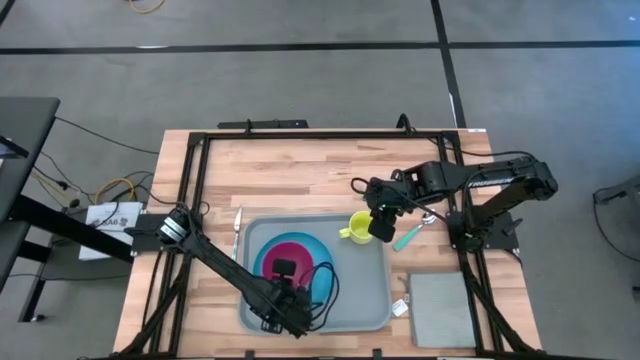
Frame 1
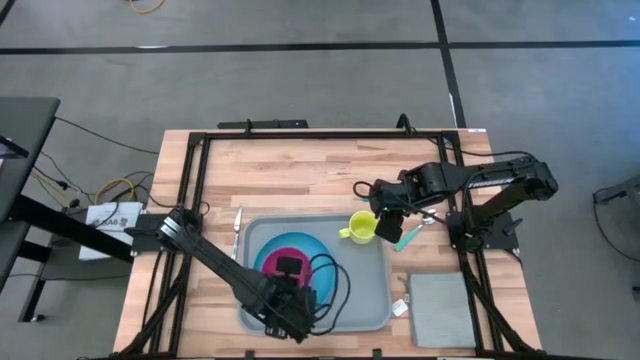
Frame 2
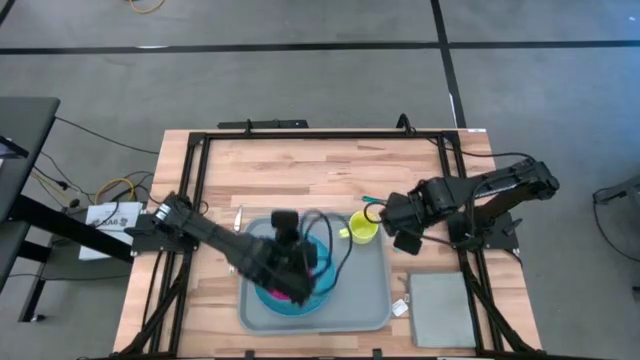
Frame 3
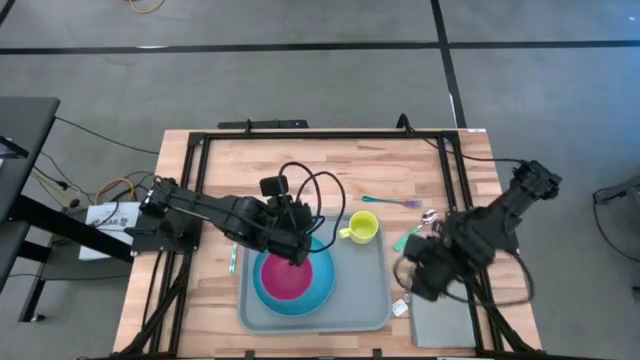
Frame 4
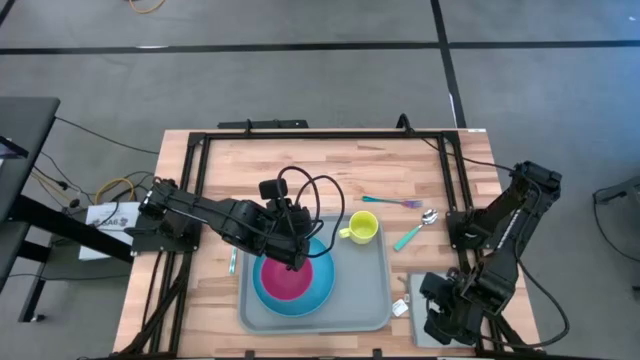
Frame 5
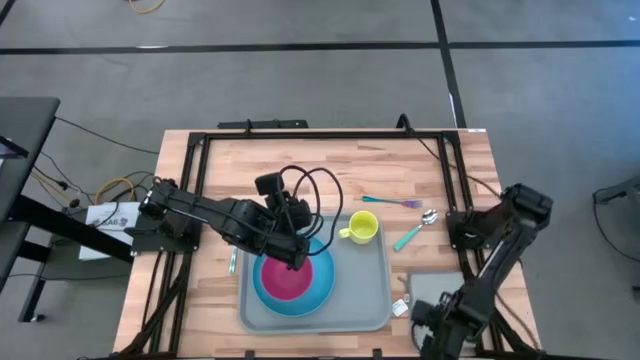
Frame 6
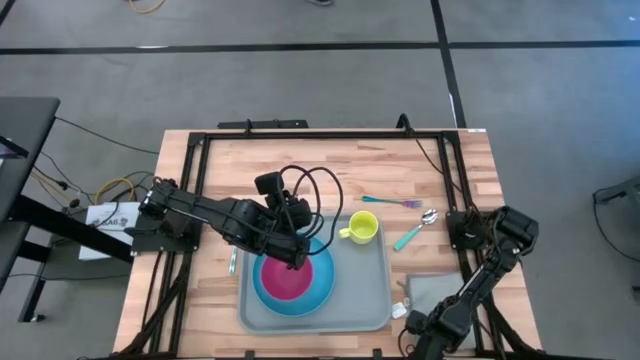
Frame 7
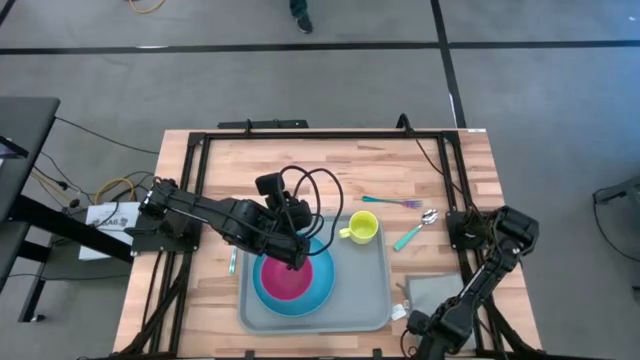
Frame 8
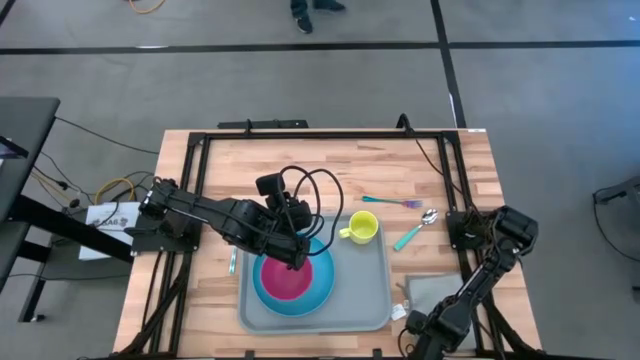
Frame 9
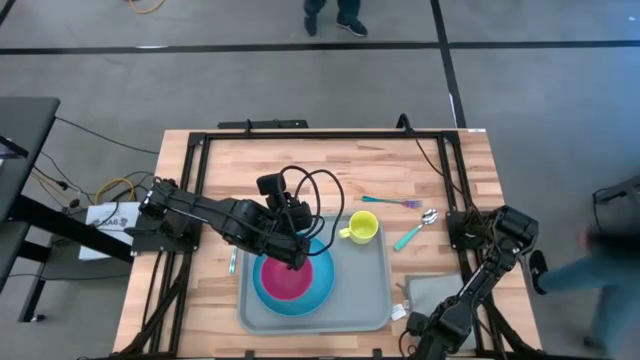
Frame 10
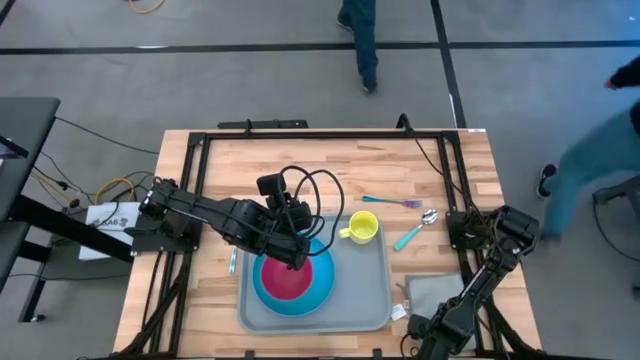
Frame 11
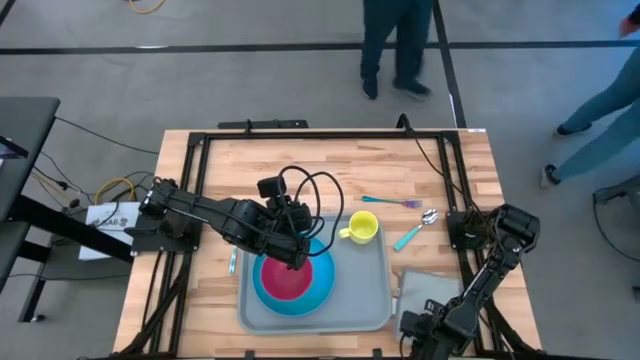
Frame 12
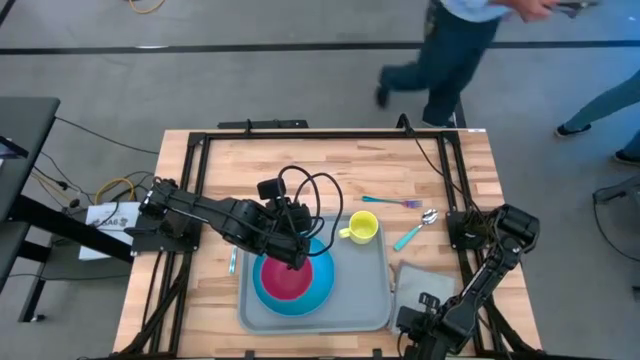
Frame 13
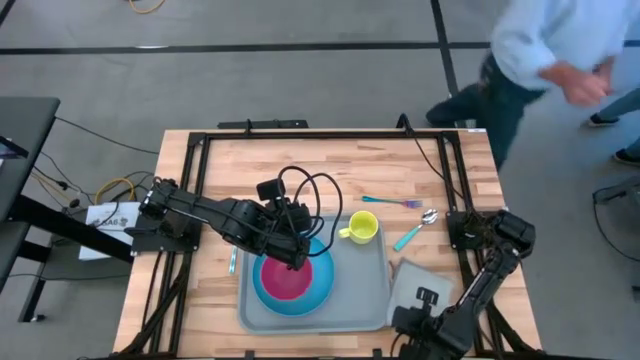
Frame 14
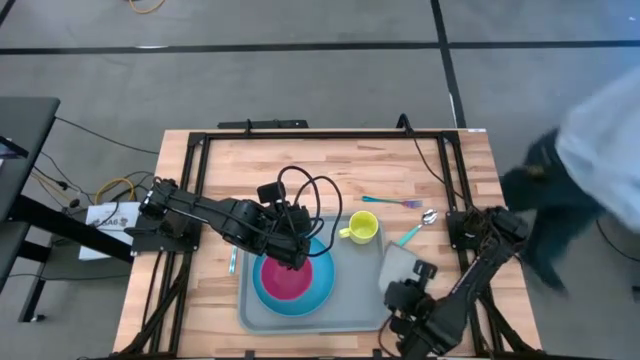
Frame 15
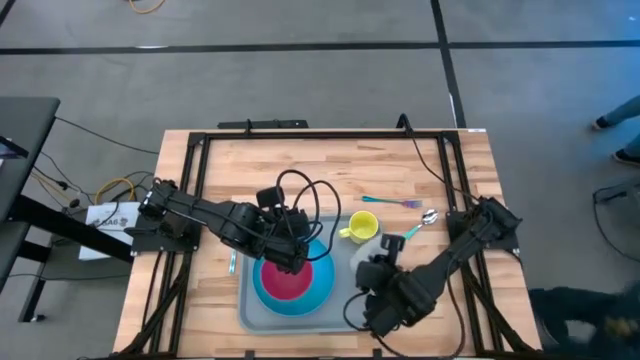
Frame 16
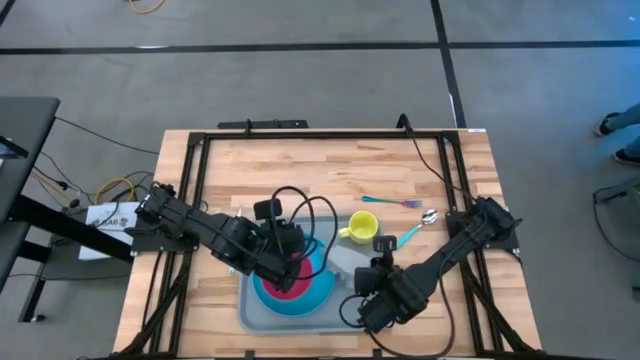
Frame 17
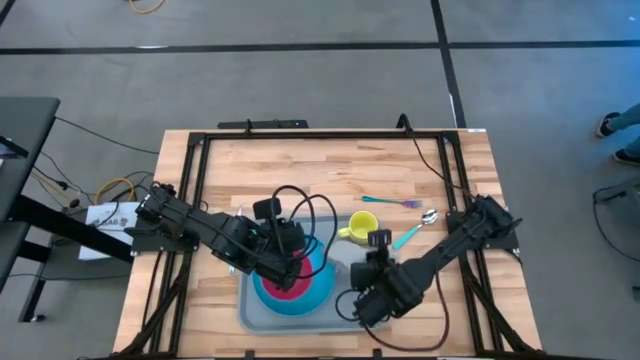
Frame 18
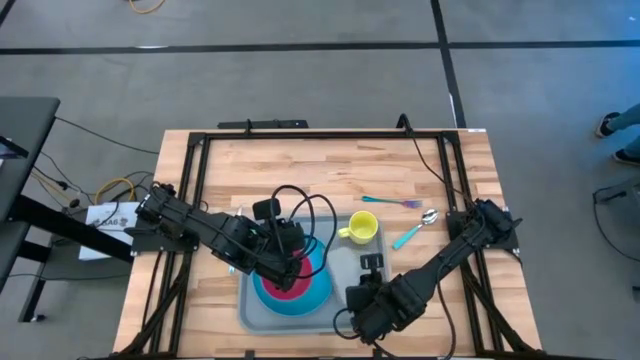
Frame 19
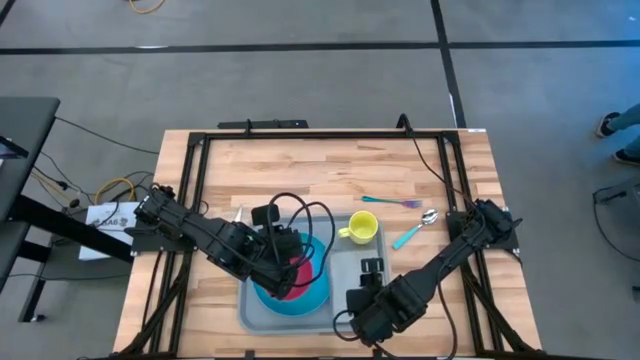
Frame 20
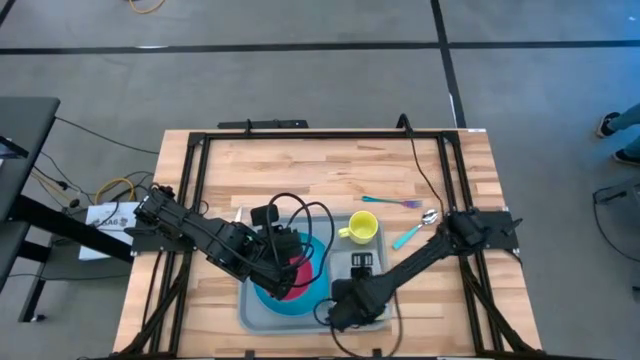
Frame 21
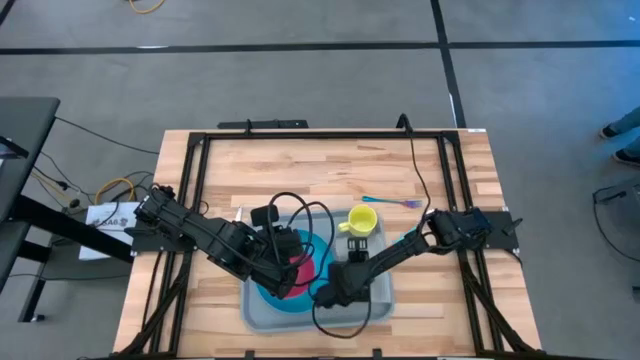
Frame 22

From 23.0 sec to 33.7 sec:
Task: Set up tray
Put the gray napkin on the gray tray to the right of the blue plate

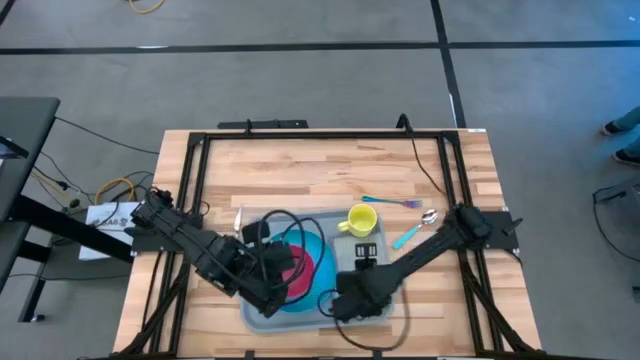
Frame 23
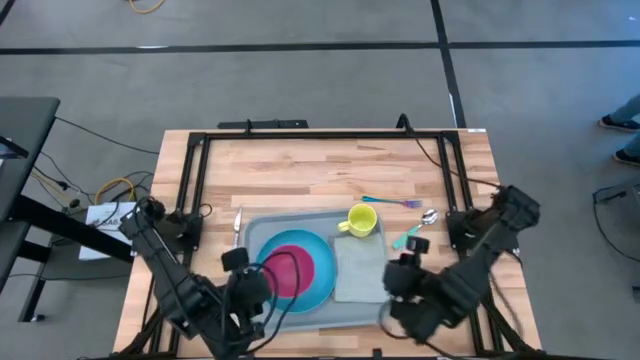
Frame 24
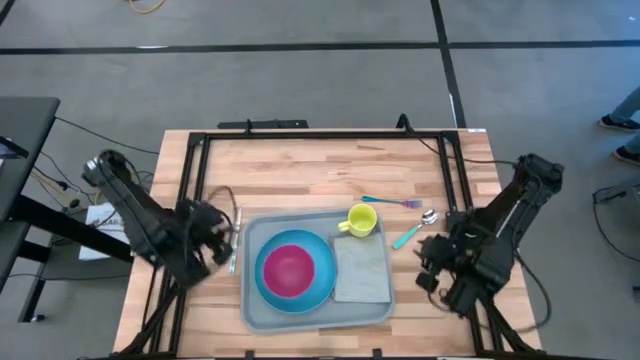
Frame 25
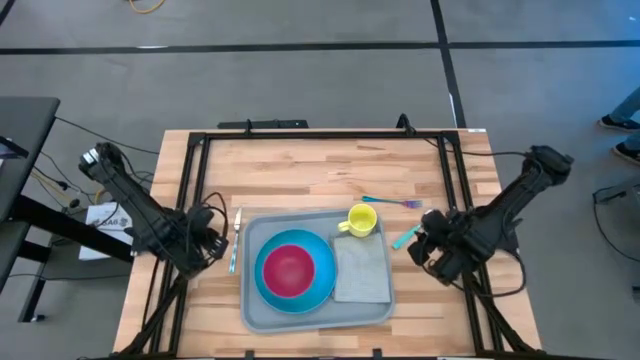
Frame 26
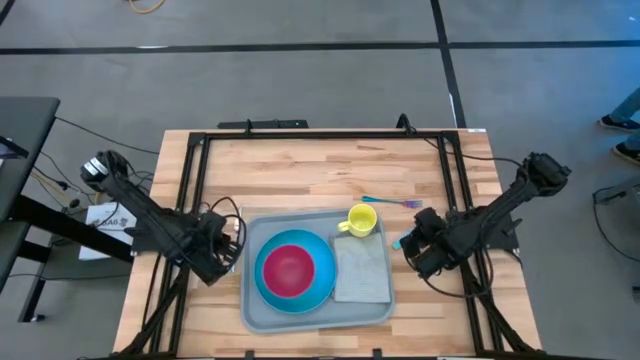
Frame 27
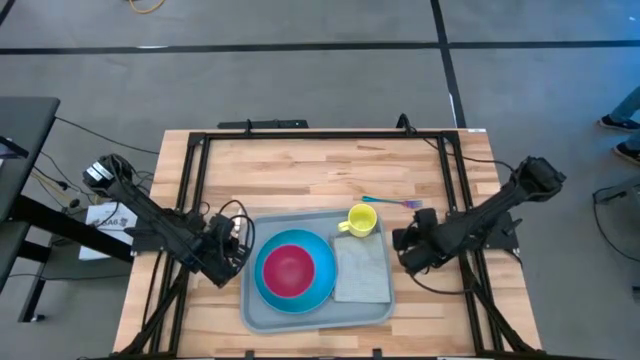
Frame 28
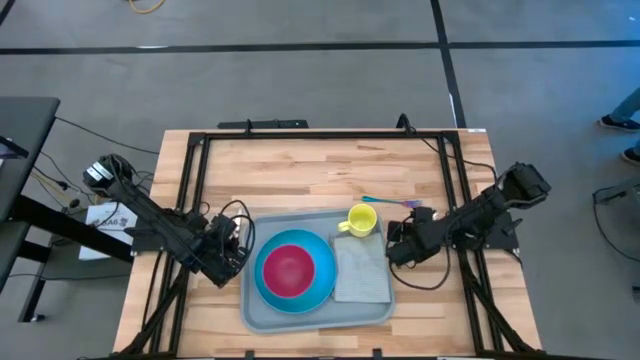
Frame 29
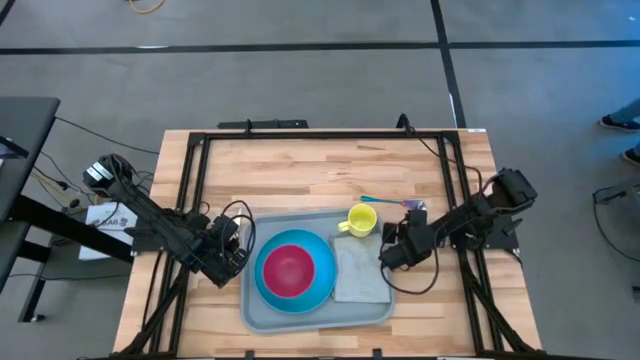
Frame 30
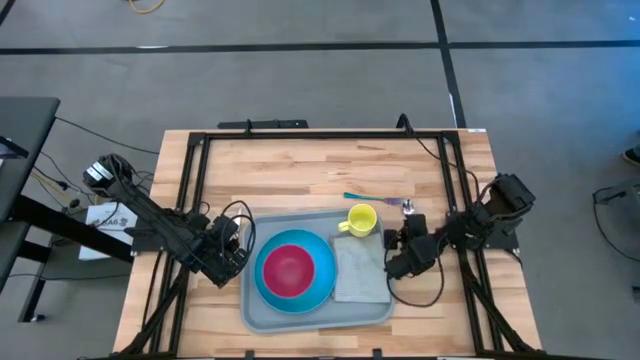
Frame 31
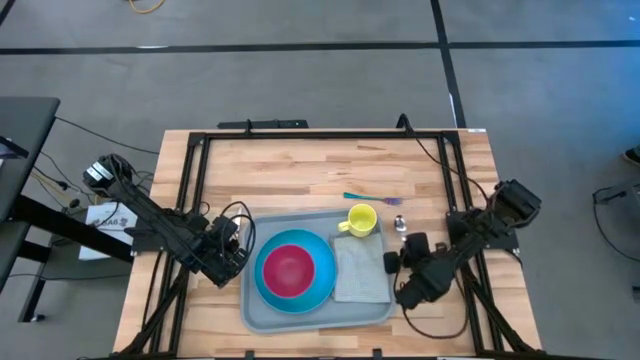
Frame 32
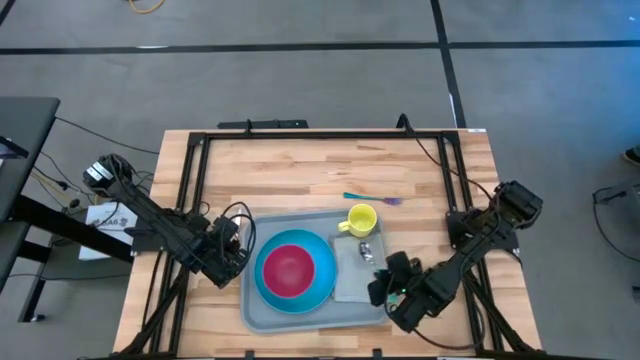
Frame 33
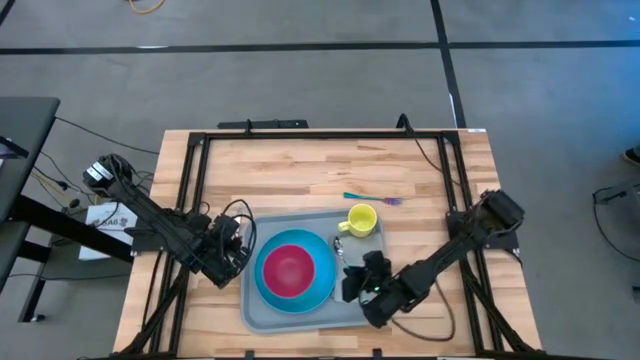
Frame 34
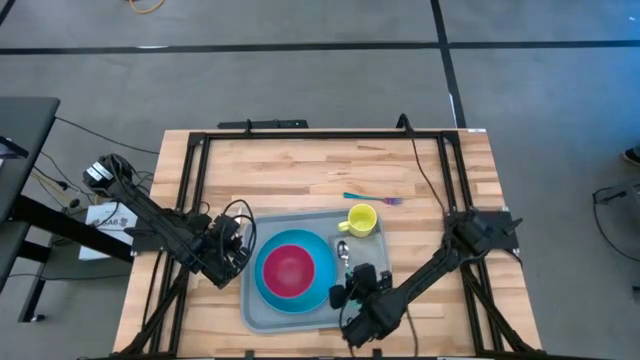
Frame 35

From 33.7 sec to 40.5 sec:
Put the light blue spoon on the gray napkin on the gray tray

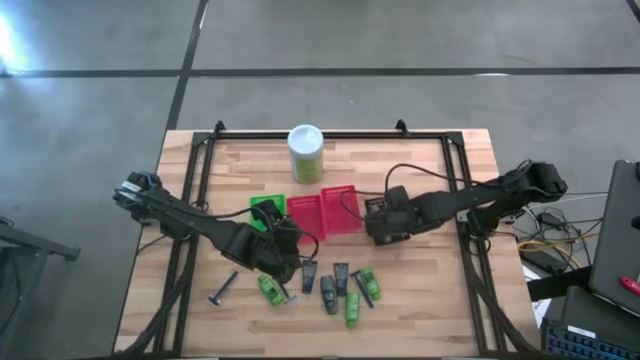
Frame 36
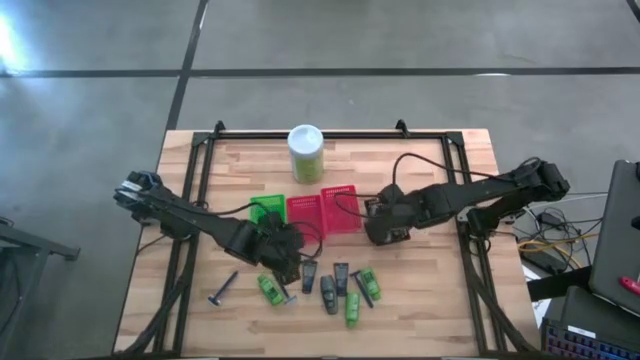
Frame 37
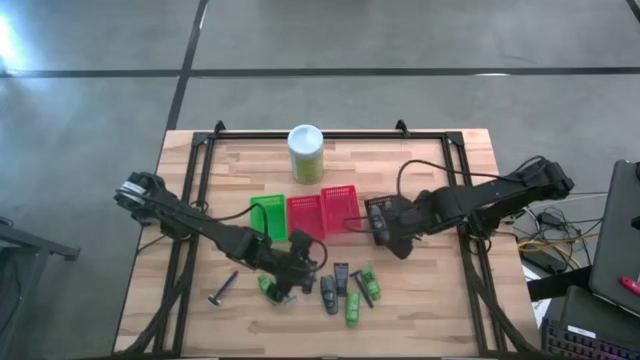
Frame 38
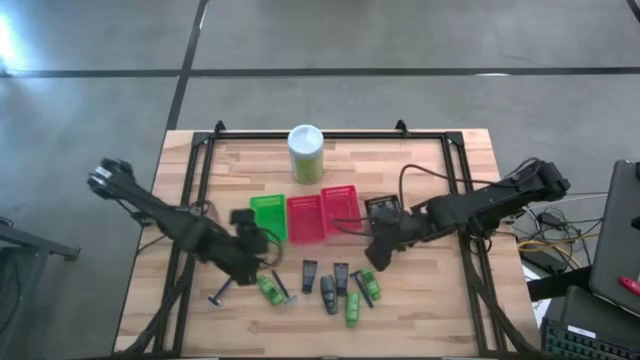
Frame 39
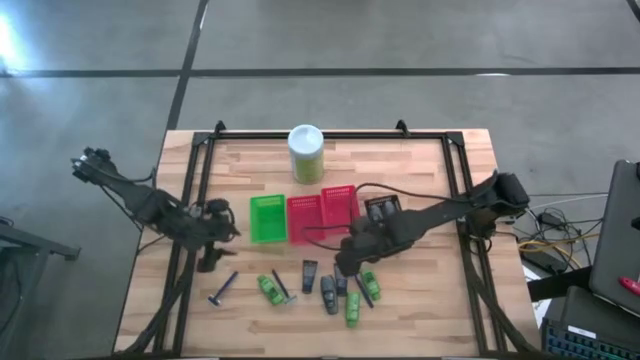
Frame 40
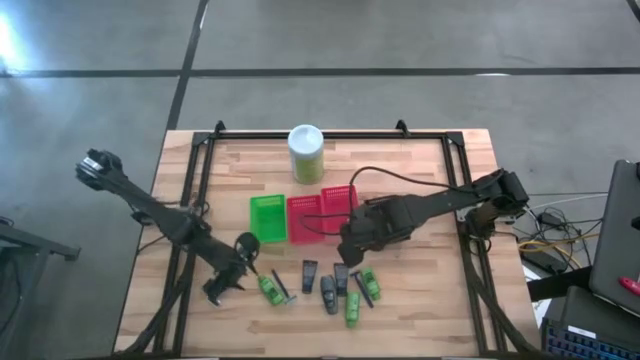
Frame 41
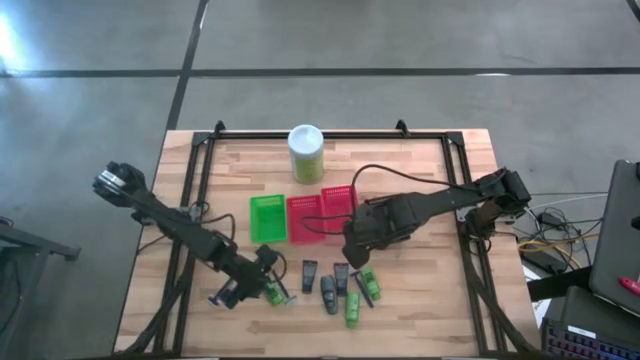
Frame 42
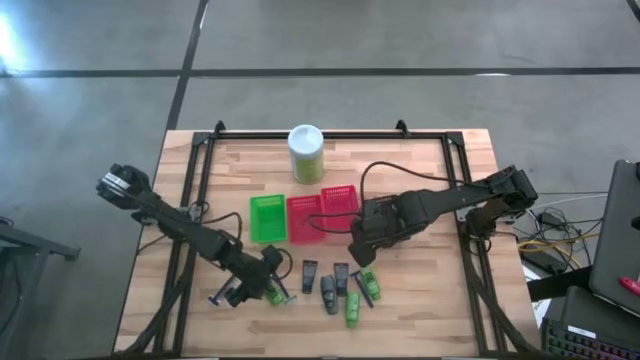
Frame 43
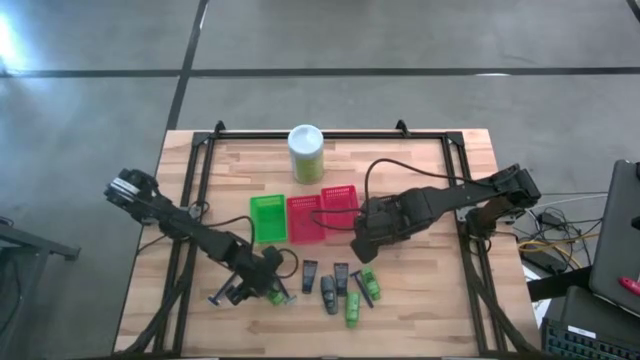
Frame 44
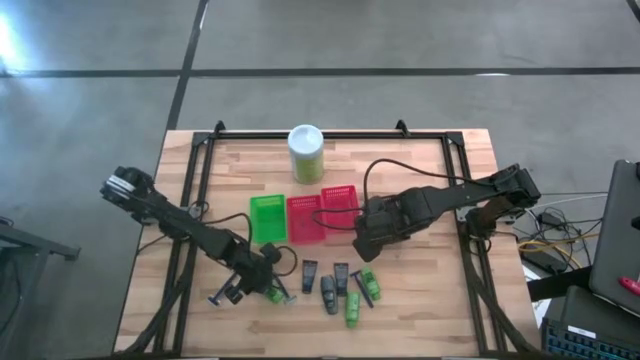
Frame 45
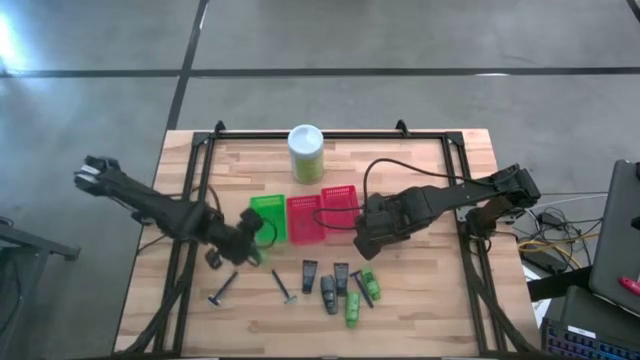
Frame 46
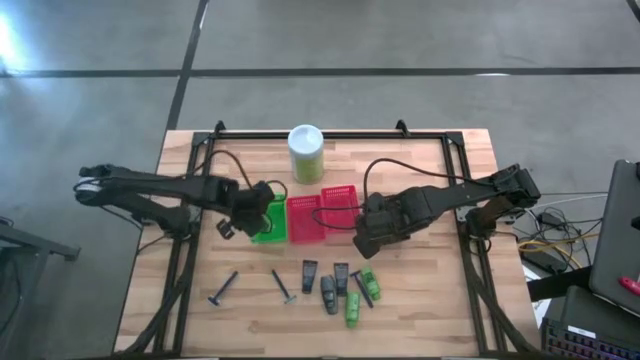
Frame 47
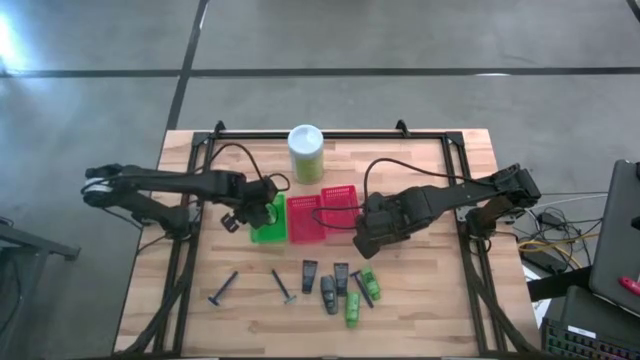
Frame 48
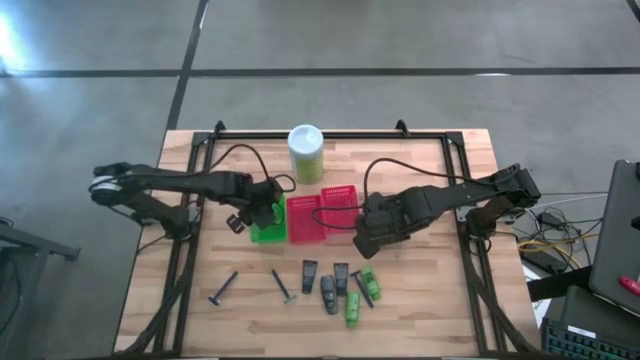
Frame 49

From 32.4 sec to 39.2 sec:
Task: Pick & Place Travel size toiletries
Put the green shampoo bottle into the green bin
